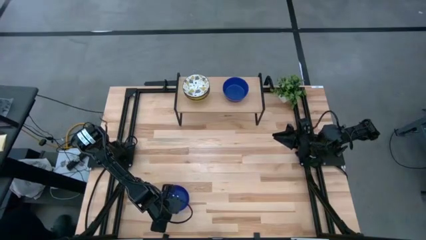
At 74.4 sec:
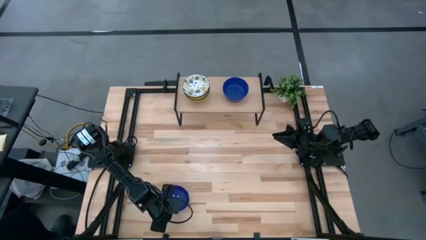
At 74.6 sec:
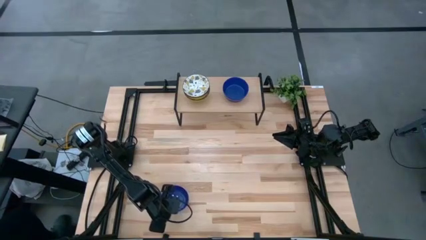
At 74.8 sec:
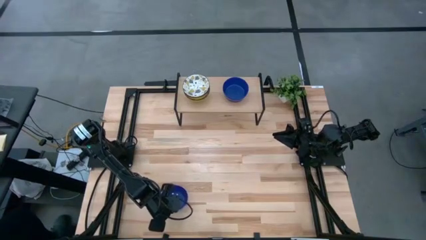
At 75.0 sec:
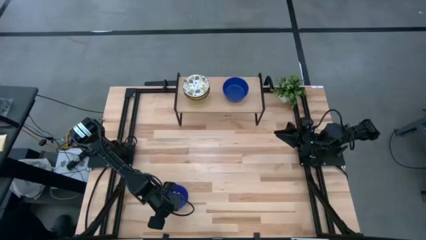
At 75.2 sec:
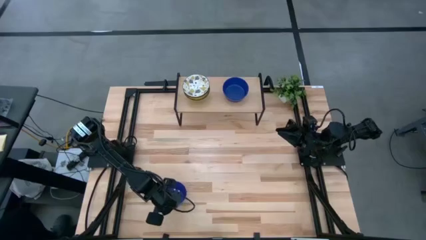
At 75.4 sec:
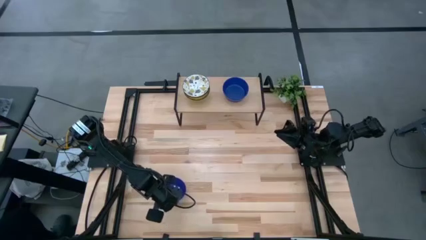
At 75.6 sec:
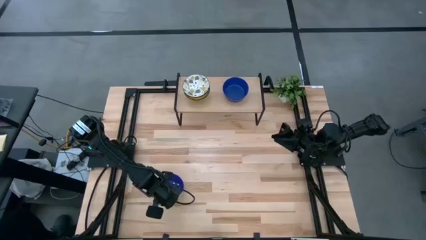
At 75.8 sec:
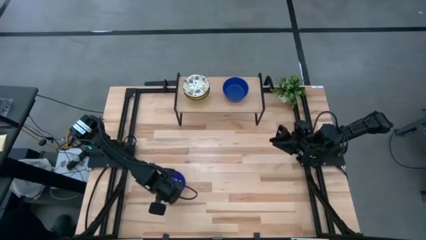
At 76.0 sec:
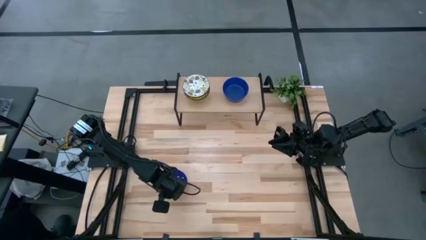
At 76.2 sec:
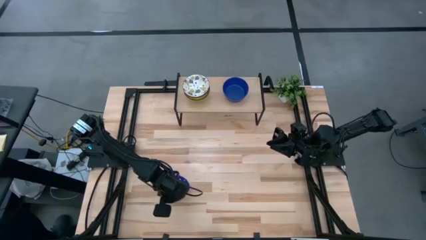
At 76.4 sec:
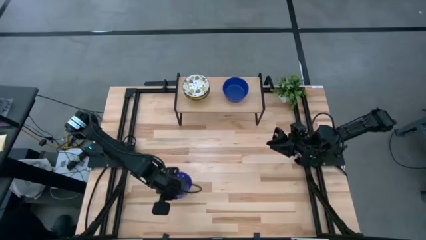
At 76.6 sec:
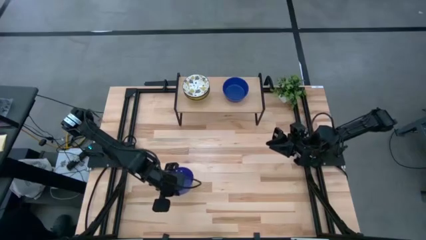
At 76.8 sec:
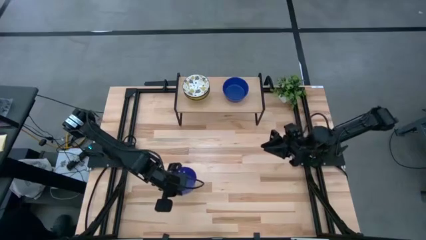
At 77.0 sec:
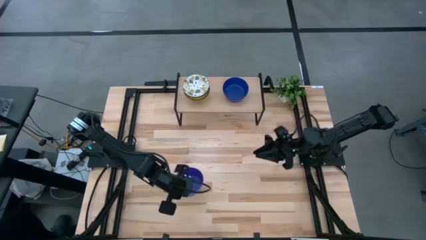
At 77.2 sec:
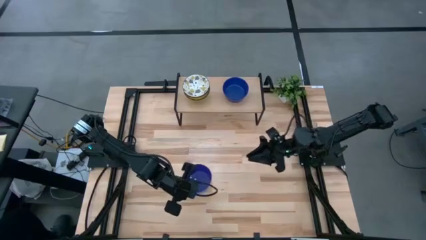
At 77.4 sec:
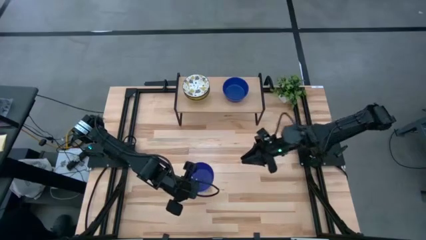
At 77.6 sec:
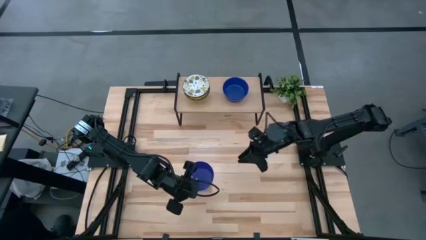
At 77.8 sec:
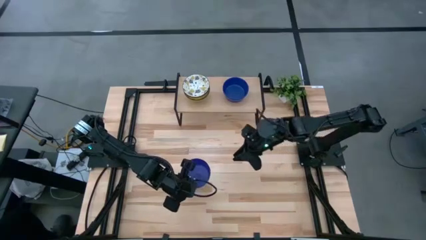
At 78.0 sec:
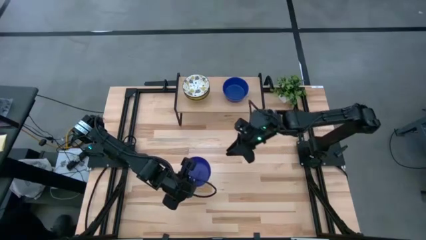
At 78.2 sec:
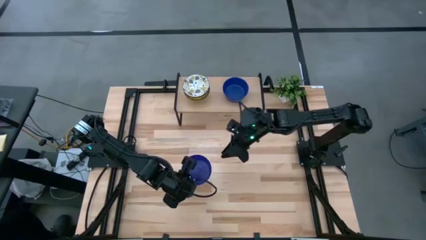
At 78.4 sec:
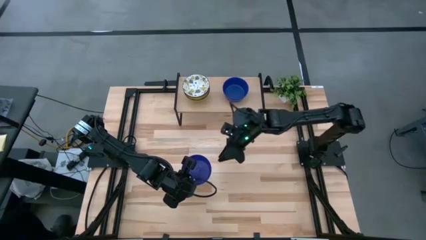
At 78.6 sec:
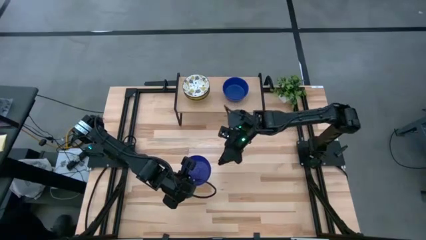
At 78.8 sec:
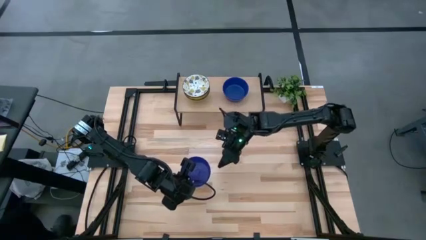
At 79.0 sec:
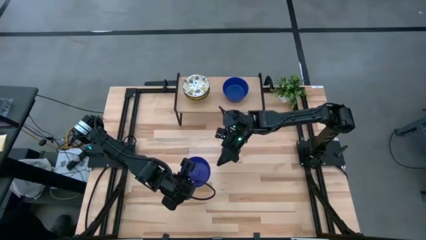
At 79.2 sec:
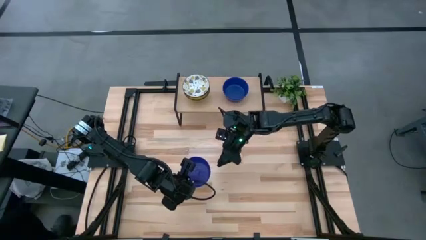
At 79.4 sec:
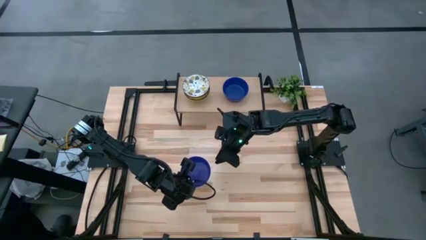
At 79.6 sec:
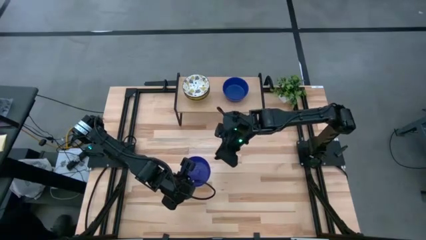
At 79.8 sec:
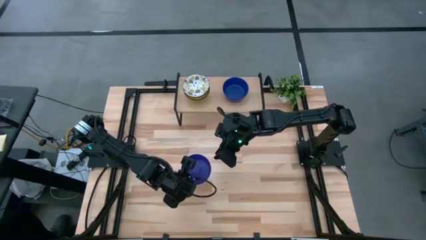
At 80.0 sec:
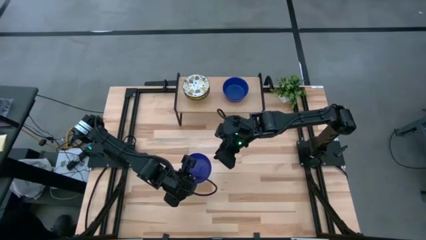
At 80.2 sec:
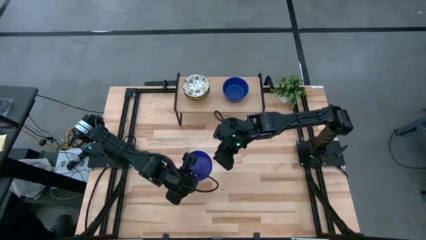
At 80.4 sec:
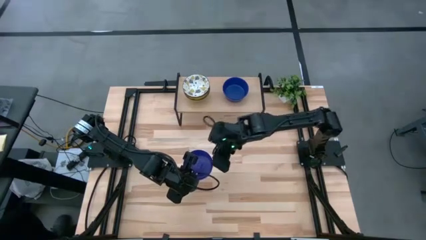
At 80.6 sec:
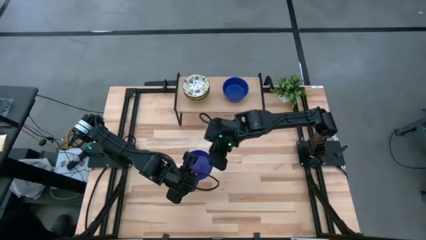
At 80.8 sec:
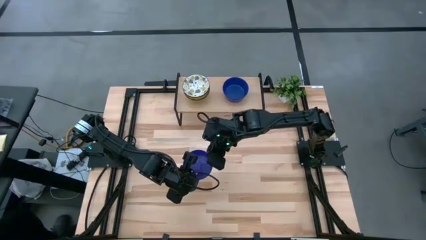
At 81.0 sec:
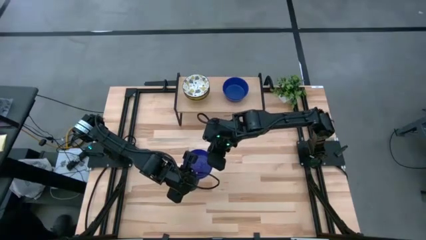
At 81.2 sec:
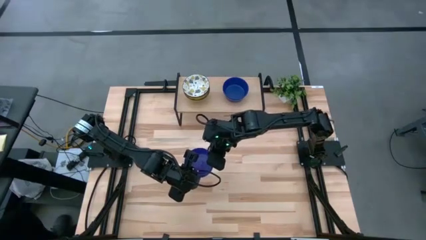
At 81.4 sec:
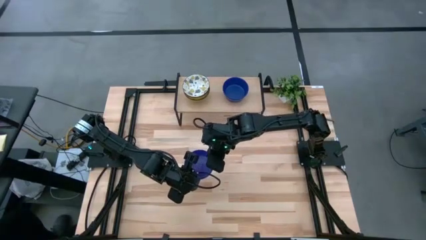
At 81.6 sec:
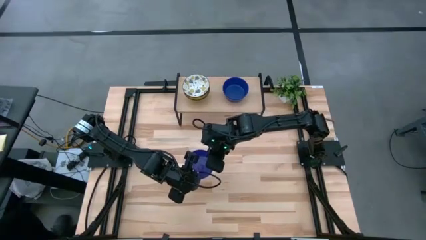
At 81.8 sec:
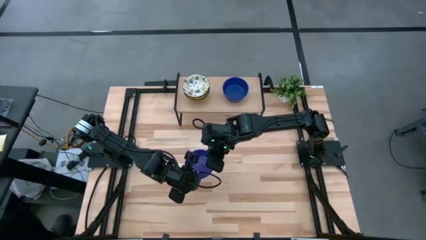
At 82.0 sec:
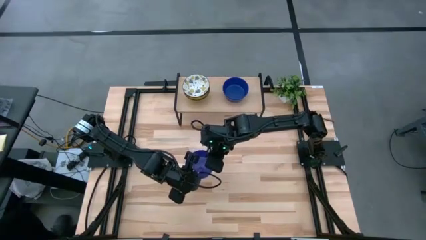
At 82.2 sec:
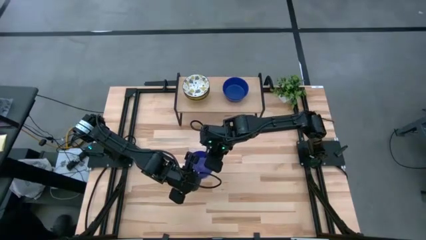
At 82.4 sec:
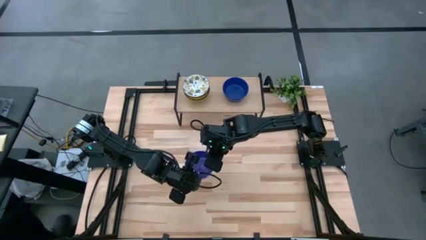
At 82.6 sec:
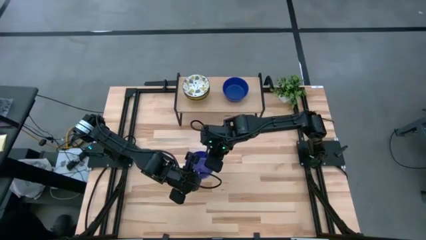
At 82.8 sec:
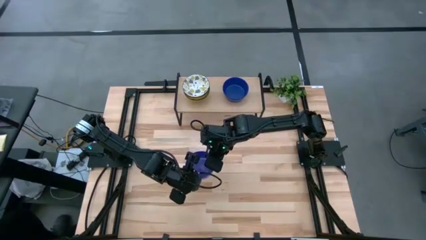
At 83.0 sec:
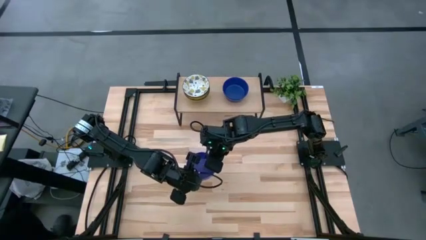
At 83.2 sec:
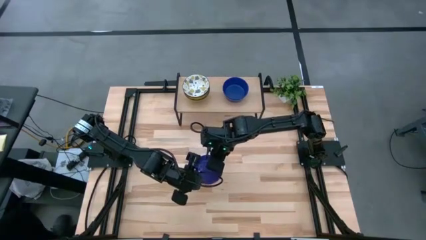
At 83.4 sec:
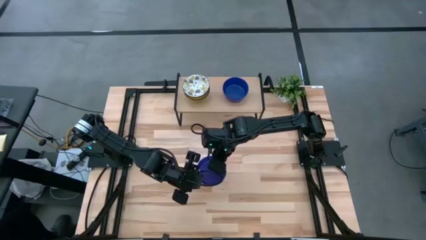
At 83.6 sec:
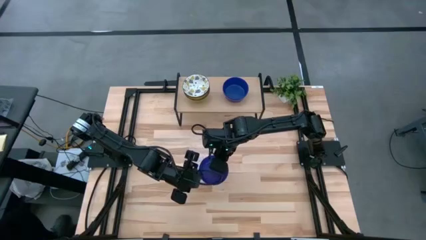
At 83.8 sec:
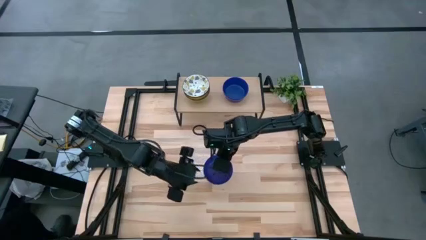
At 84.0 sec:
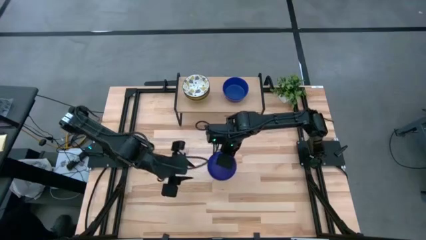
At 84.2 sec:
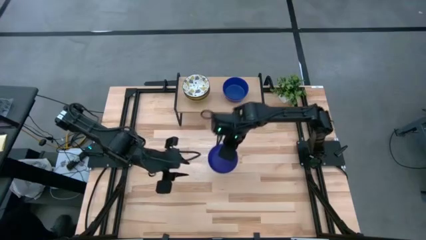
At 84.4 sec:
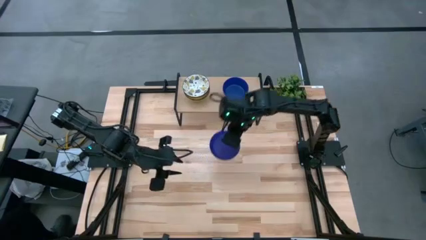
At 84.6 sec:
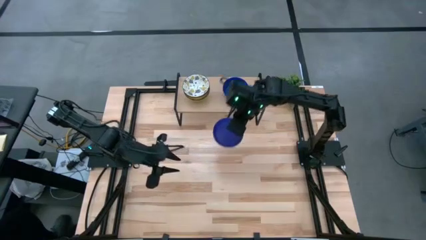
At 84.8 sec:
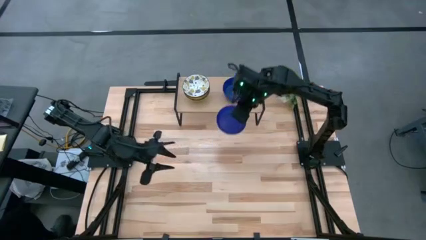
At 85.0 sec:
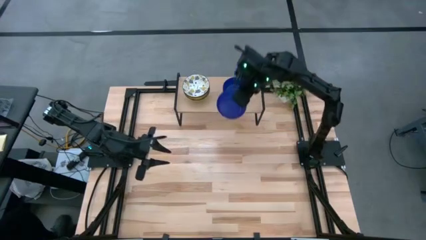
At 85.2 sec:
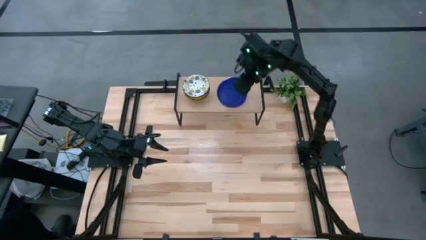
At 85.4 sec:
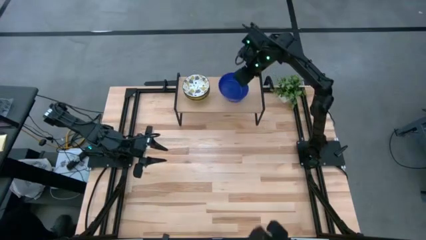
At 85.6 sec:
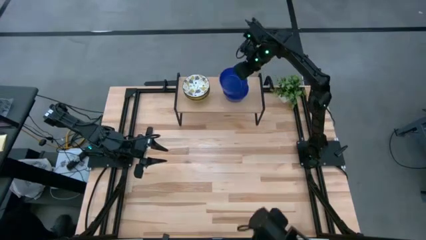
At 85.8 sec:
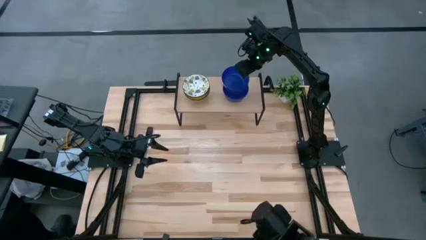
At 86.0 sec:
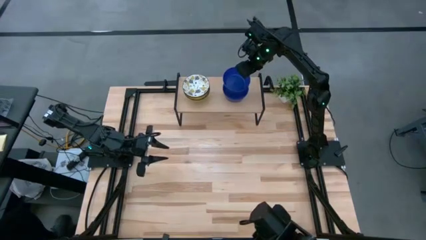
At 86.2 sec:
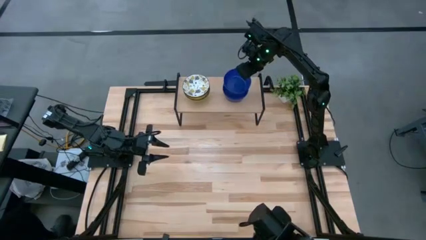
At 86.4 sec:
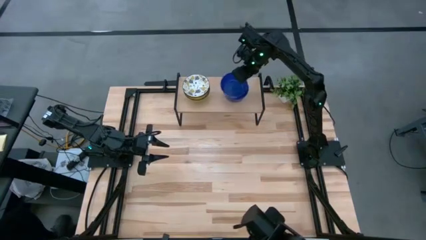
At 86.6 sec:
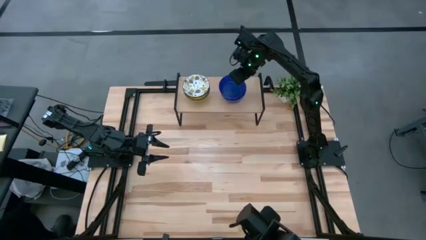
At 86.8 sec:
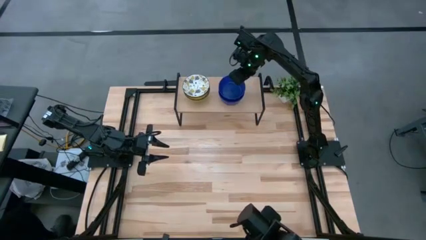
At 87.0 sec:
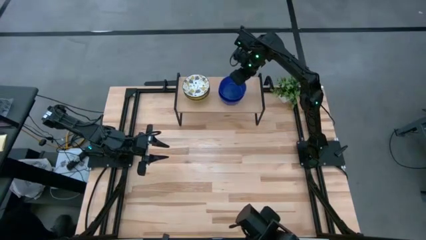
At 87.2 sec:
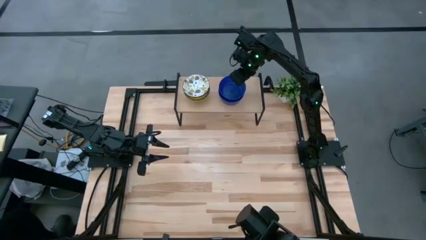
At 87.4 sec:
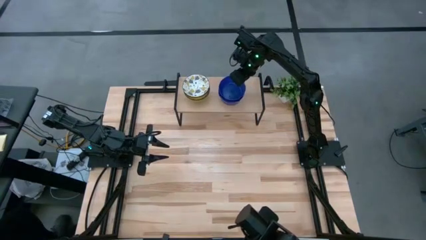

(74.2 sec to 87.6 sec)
Task: Pick & Place Mini bowls
Stack the blue bowl on top of the blue bowls on the shelf

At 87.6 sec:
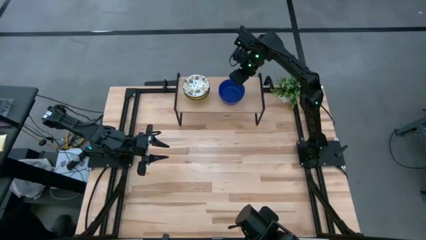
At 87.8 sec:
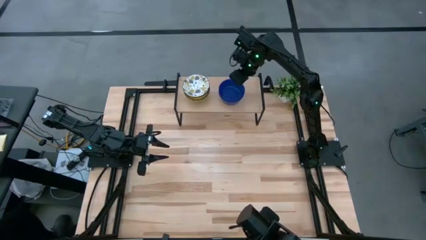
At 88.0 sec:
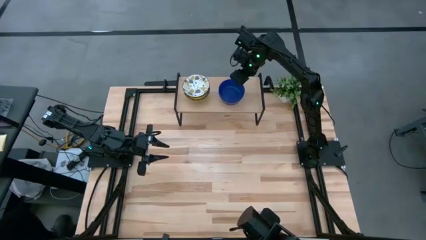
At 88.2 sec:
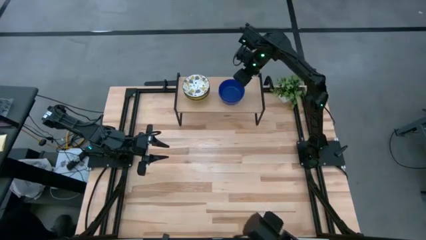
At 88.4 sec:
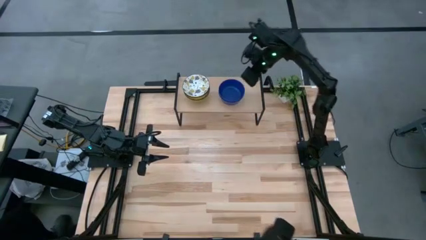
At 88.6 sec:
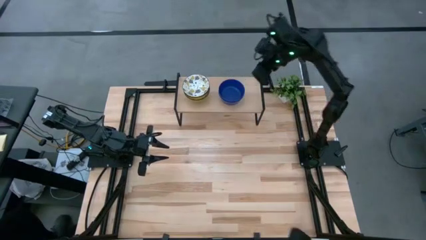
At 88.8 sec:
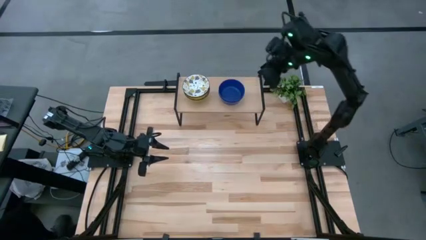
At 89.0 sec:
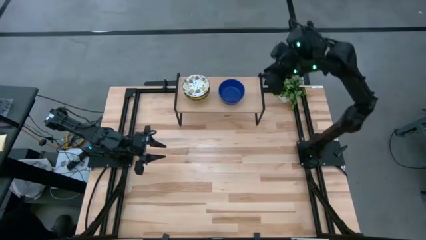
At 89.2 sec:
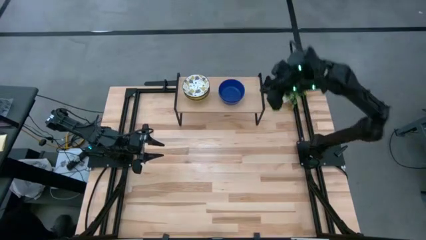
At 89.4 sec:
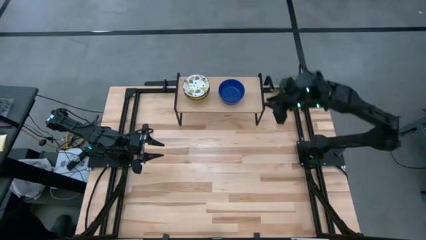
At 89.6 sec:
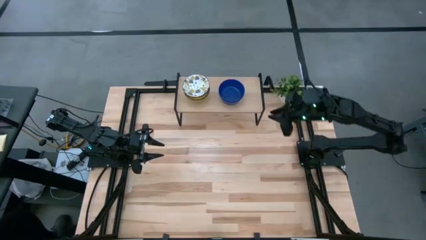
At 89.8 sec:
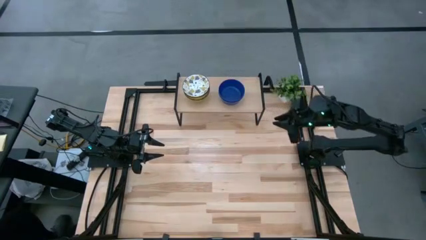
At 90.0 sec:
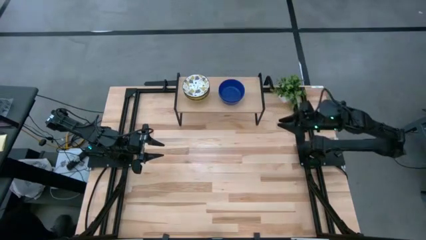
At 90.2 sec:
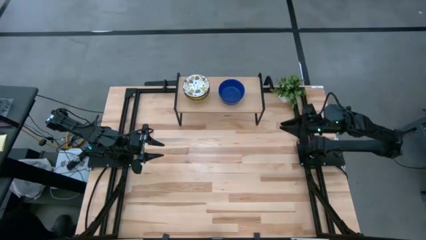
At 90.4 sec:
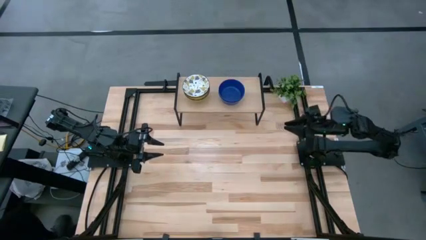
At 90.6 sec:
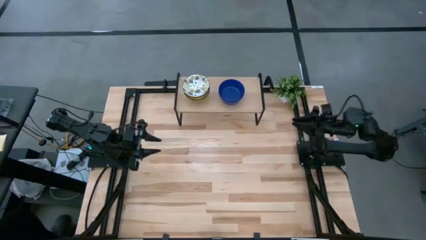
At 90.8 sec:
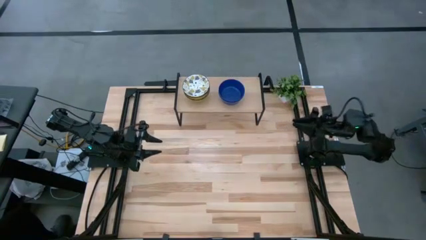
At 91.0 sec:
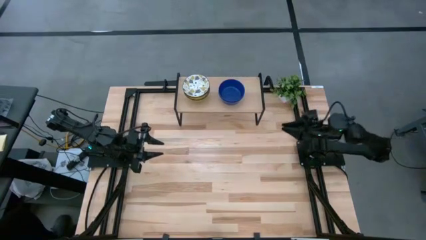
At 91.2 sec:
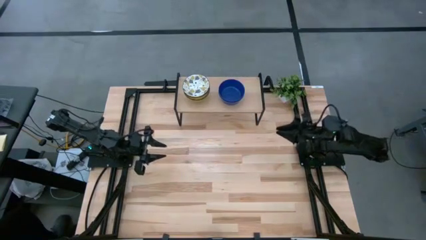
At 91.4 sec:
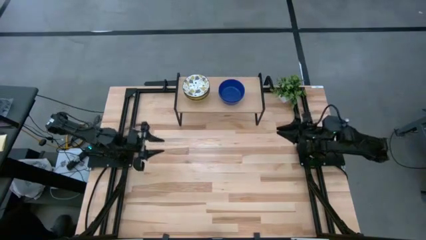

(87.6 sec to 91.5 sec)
Return to Home Position
